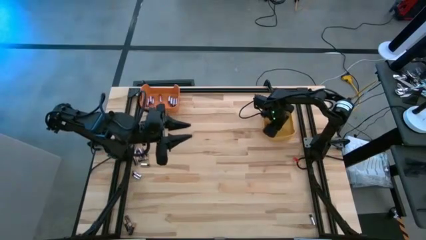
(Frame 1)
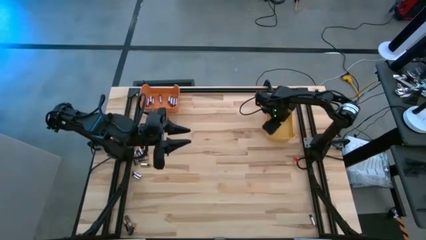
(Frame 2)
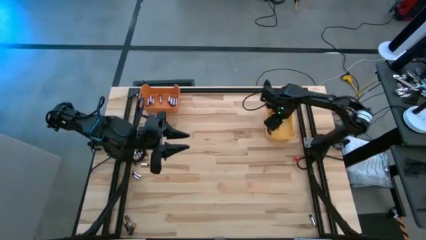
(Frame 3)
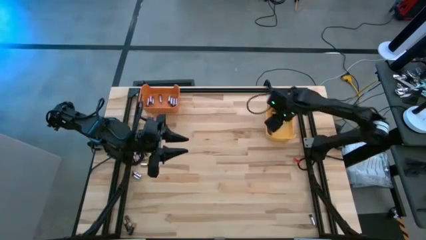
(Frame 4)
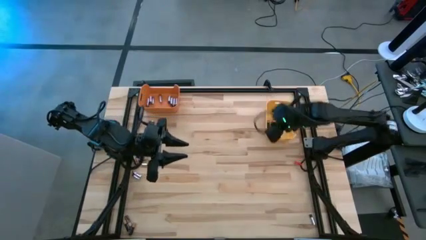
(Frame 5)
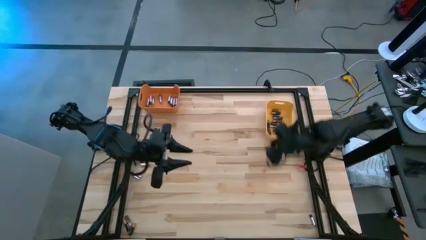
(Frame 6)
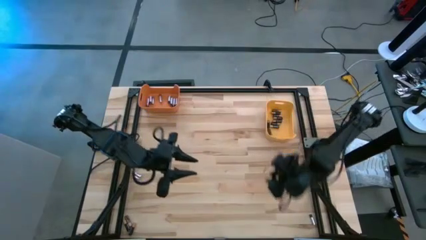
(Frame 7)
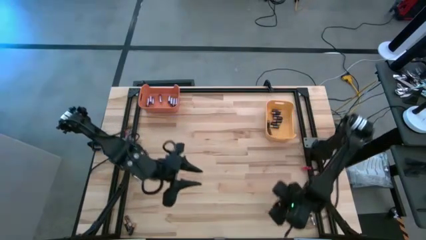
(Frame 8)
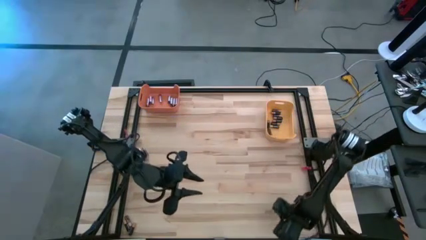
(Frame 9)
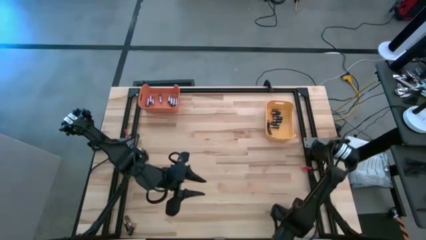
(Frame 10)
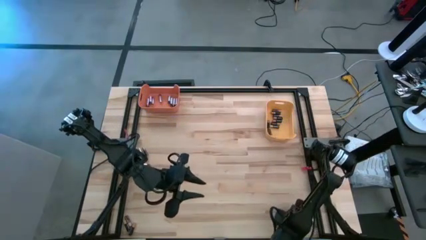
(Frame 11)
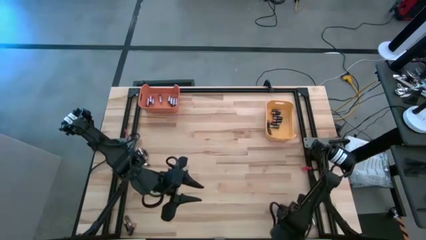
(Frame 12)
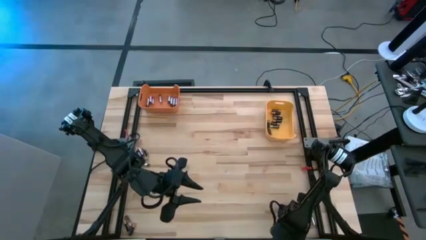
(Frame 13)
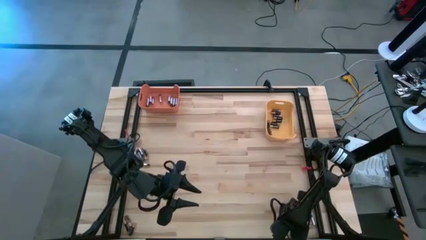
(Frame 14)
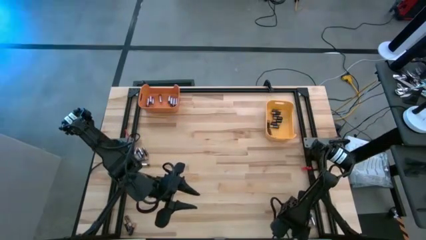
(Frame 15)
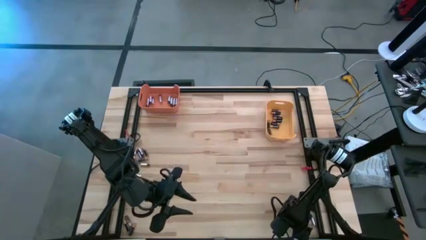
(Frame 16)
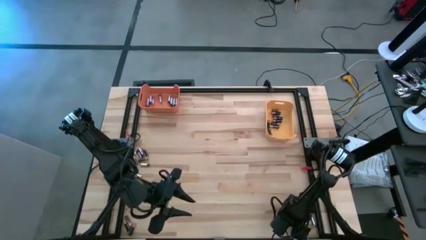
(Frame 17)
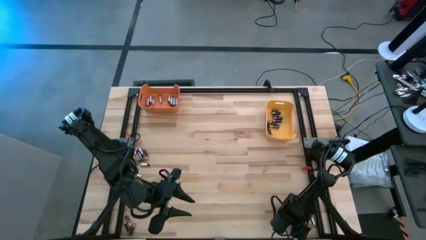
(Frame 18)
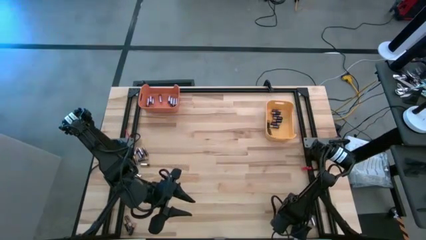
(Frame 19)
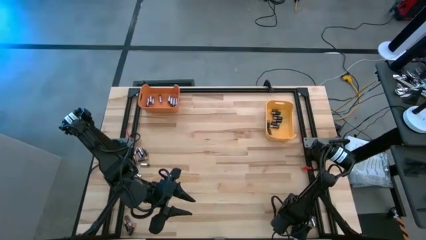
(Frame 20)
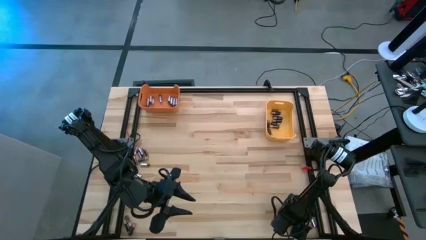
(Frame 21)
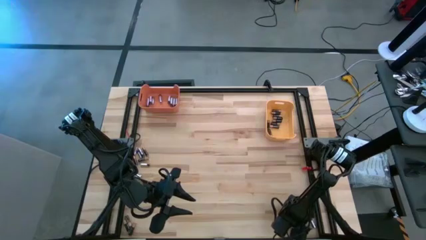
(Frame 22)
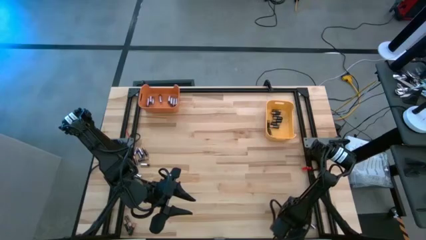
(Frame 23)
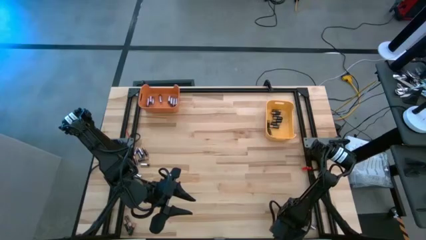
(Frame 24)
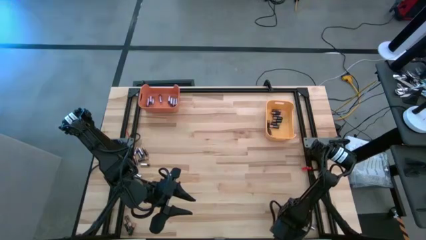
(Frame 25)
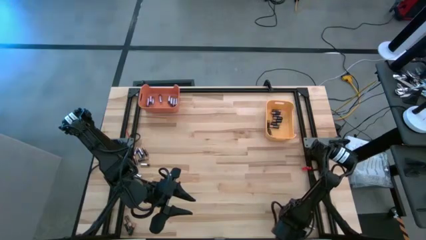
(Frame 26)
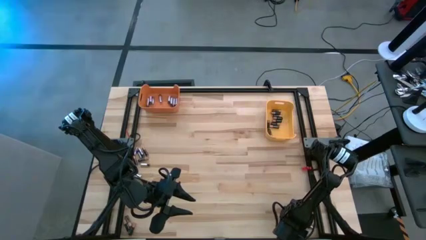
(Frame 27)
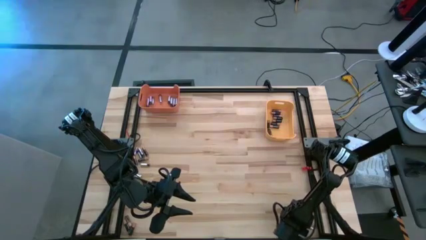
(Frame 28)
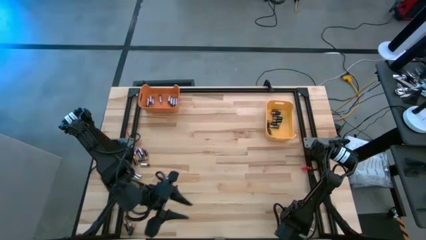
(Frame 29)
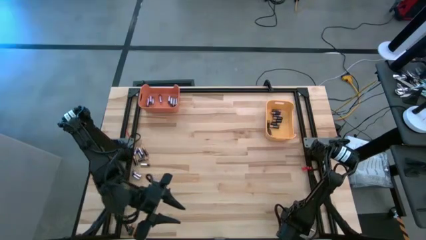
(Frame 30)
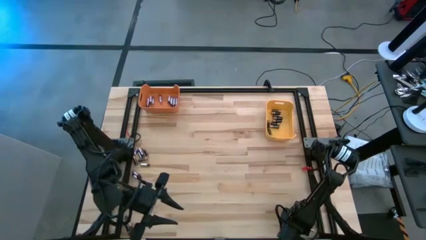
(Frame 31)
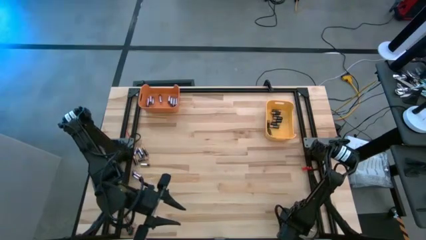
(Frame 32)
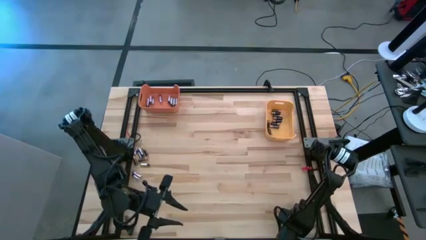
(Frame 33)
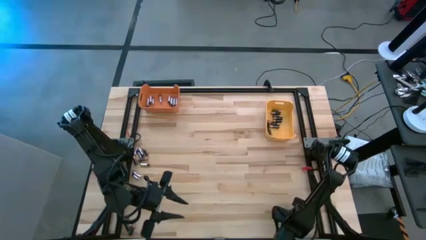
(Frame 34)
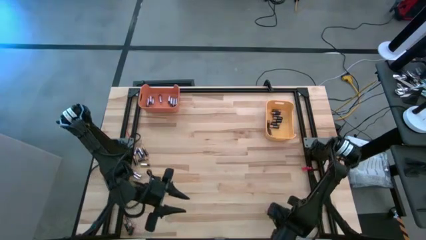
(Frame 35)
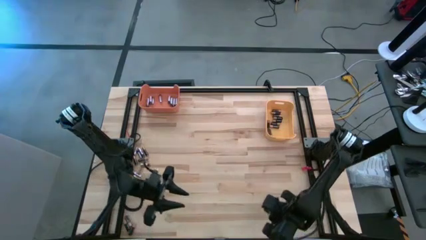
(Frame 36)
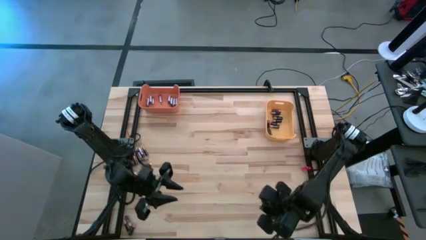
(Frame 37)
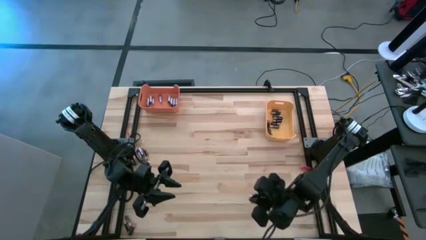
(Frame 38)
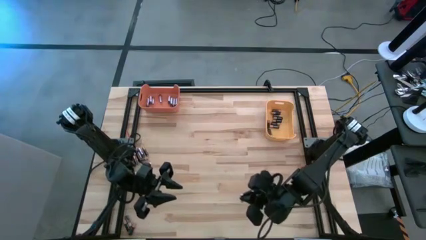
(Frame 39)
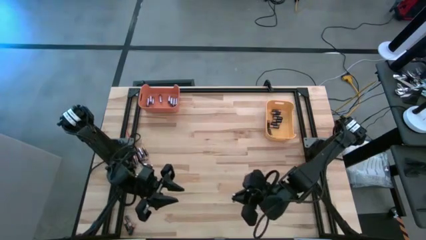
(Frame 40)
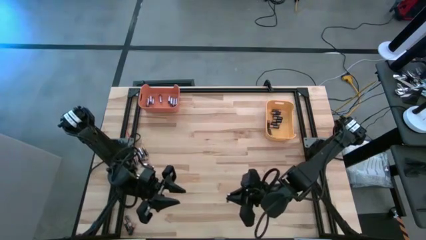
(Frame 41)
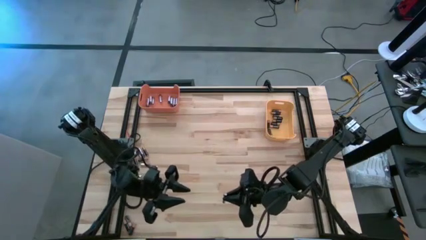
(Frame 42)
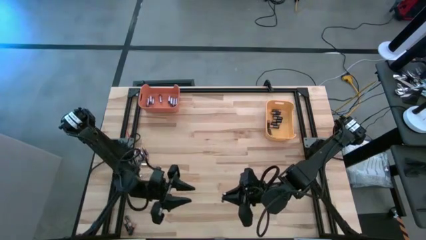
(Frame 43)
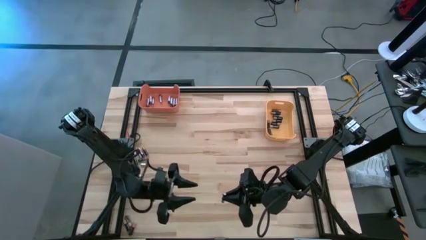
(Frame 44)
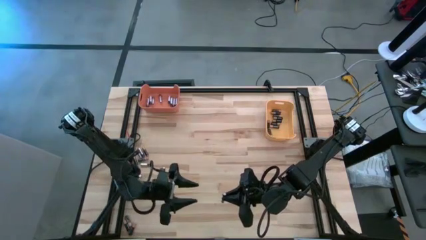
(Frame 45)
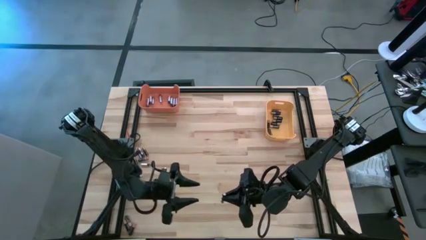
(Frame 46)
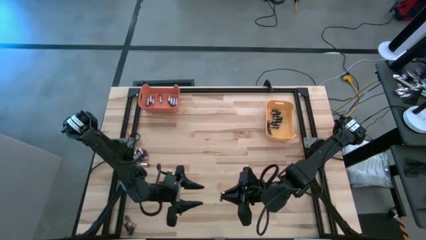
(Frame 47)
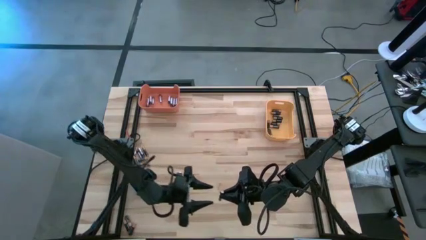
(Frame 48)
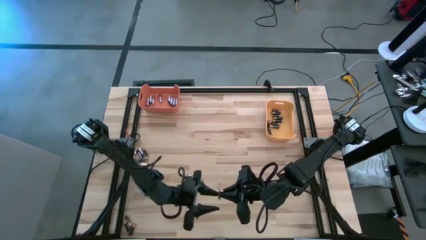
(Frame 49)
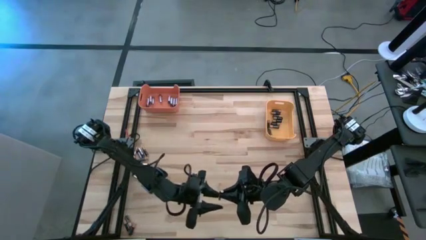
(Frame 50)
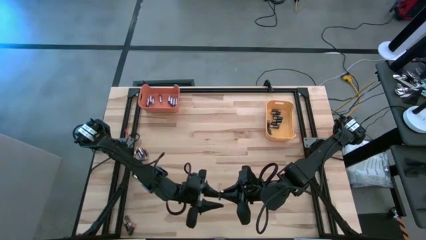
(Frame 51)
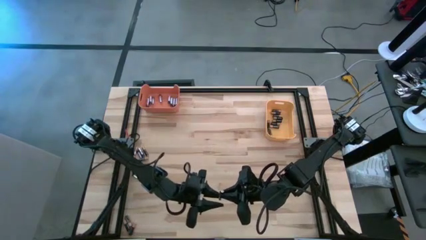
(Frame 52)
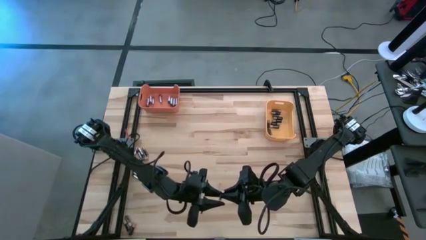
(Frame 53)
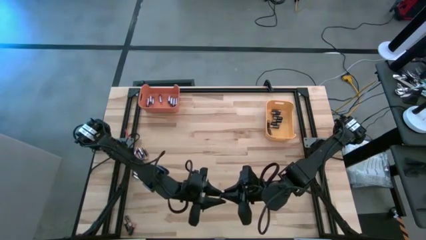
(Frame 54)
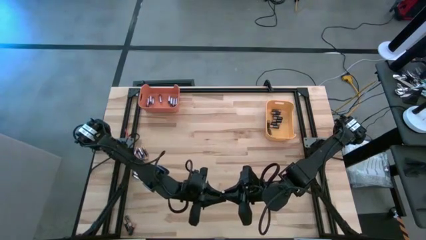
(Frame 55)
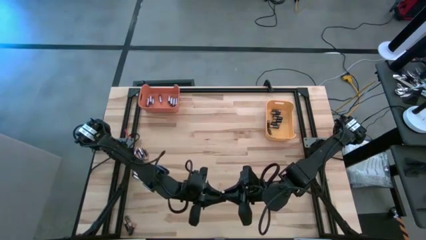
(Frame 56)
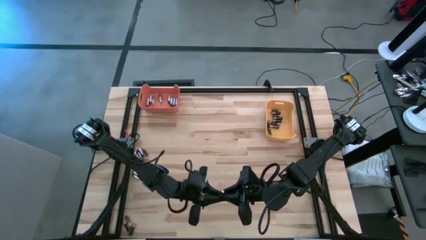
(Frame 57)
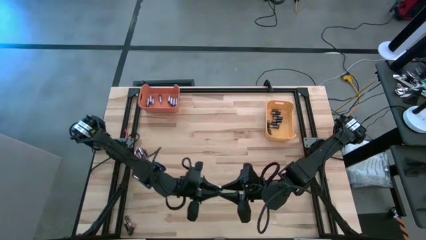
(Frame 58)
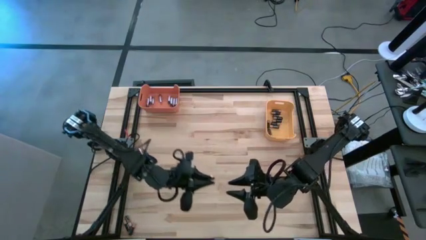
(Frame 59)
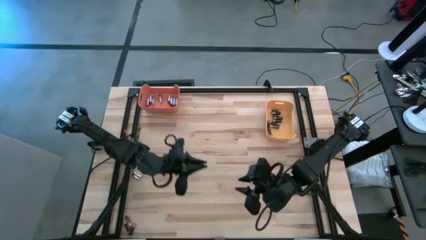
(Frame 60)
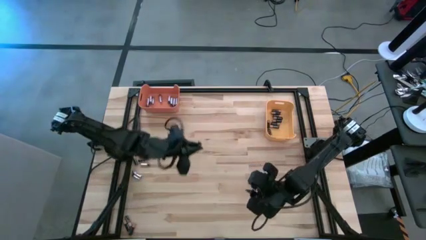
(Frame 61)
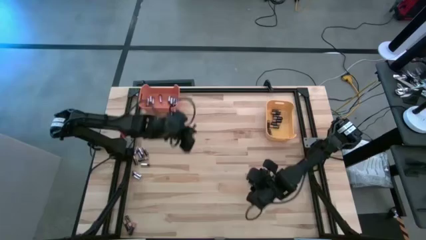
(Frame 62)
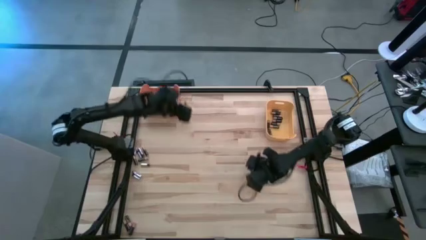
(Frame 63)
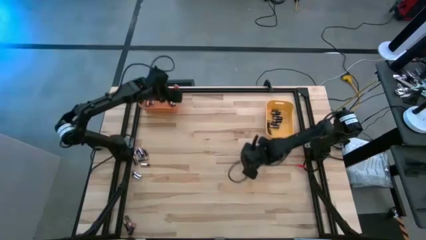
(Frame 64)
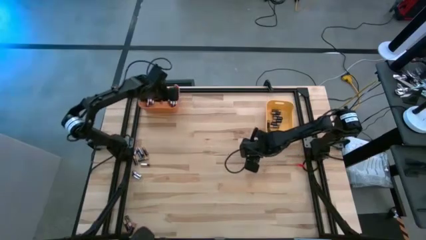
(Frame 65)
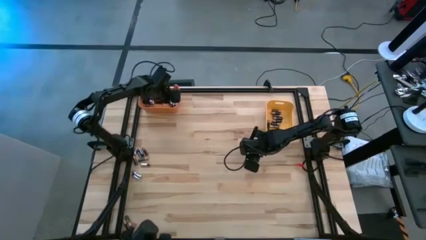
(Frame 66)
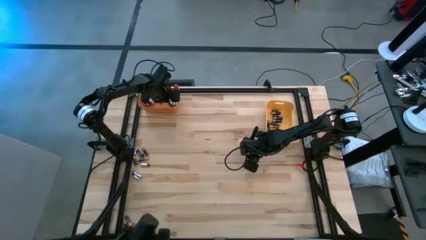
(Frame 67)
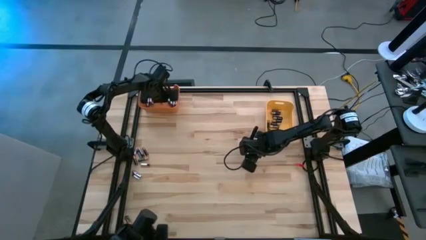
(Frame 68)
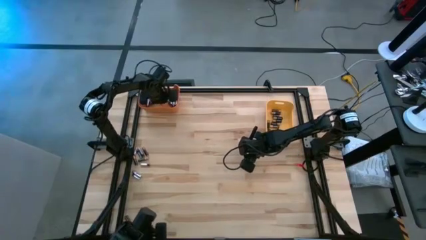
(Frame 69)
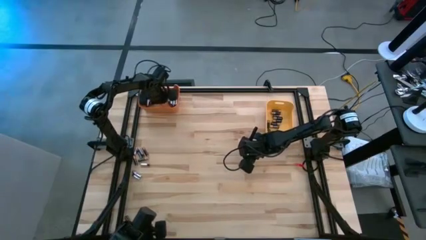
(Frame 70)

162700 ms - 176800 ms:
Task: Sort batteries
Put the silver battery into the orange bin

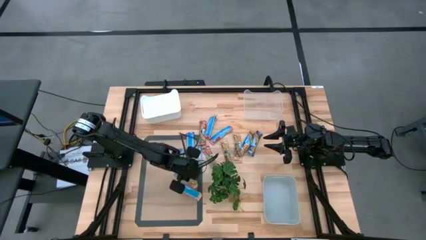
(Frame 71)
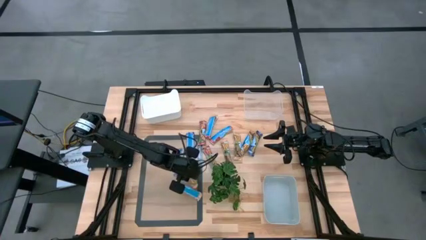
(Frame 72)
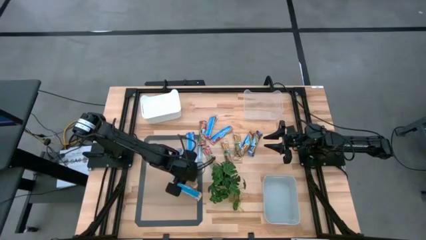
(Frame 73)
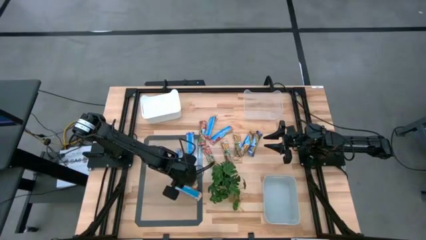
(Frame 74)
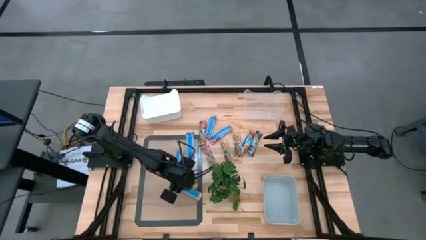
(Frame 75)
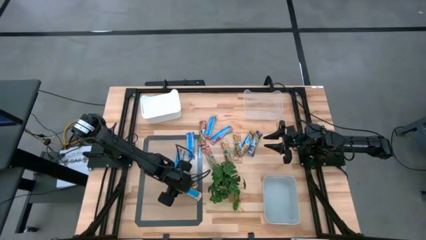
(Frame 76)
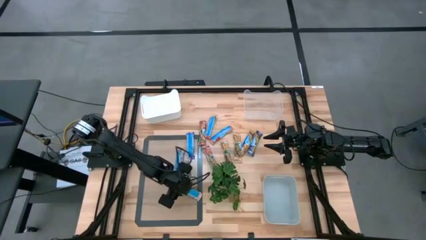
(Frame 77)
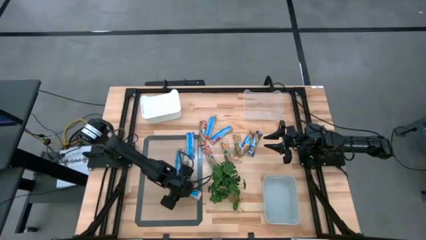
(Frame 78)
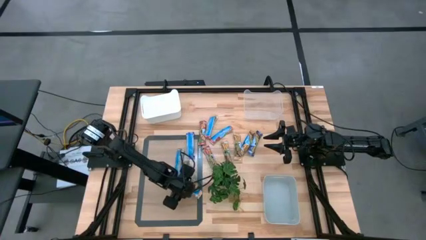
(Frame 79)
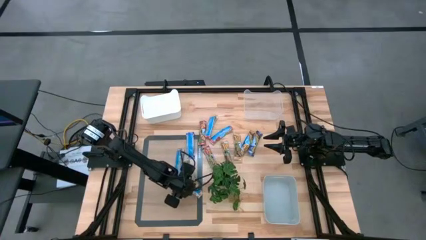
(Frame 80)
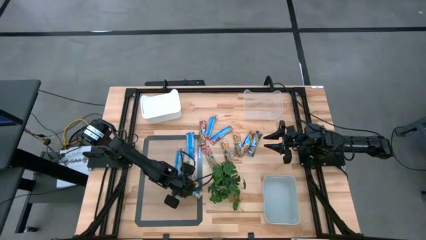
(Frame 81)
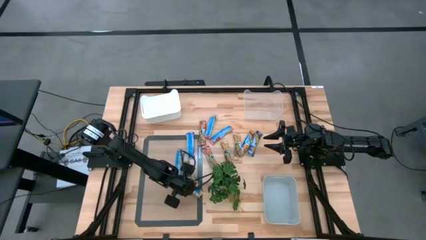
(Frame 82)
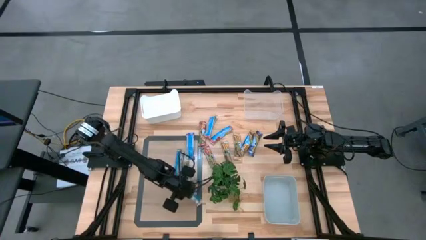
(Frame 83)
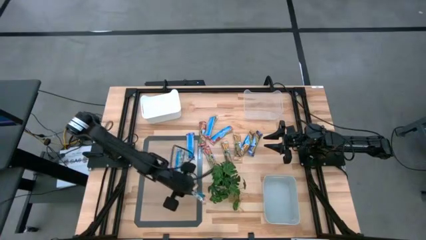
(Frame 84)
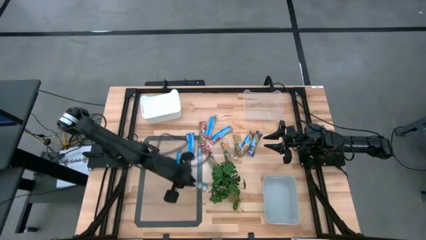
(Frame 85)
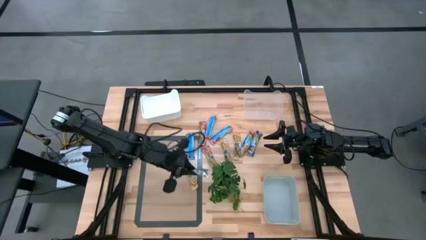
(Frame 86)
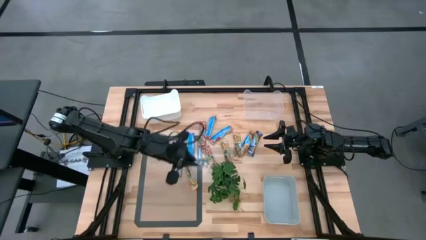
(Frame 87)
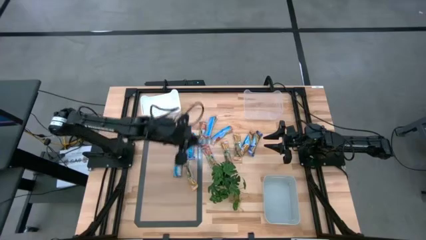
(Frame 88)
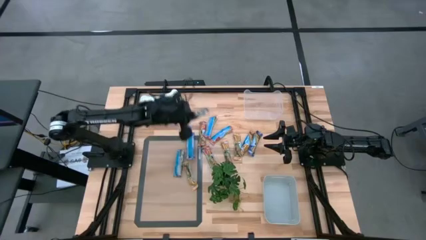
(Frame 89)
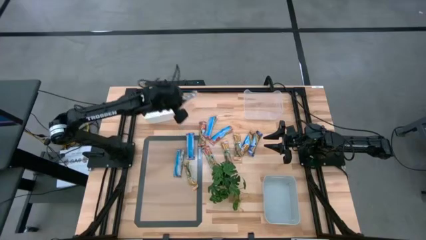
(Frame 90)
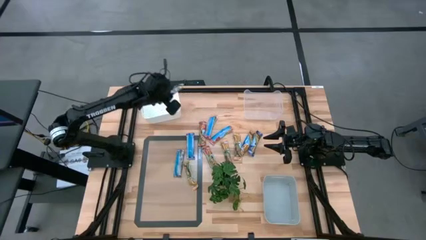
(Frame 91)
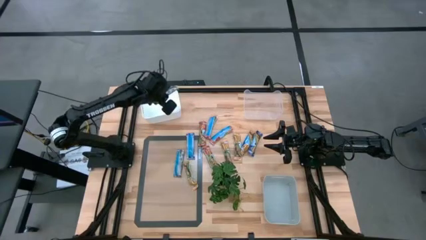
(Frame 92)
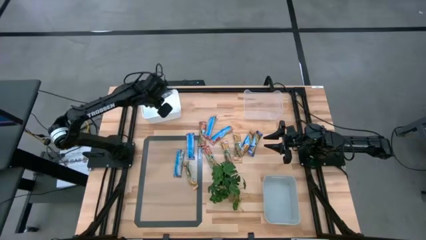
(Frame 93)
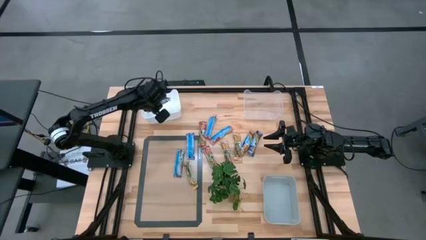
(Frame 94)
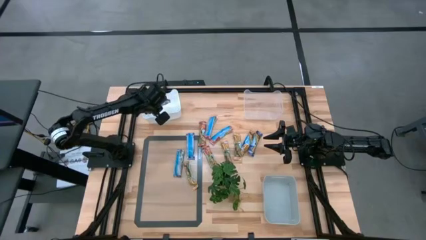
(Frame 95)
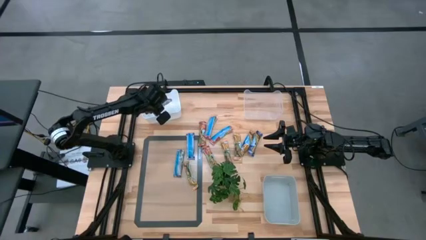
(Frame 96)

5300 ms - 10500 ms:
Task: Pick and place Granola Bars by type
Put the yellow granola bar into the white bin
